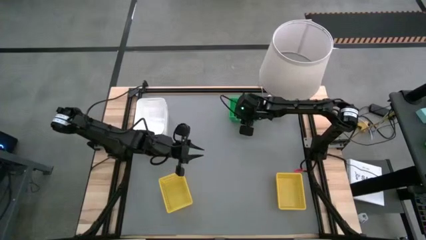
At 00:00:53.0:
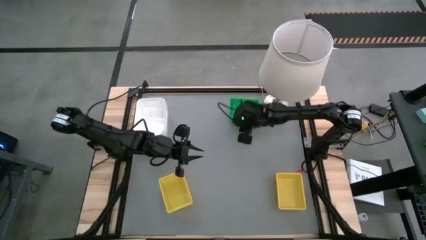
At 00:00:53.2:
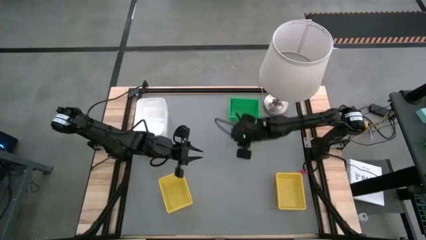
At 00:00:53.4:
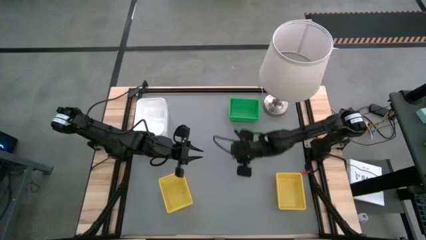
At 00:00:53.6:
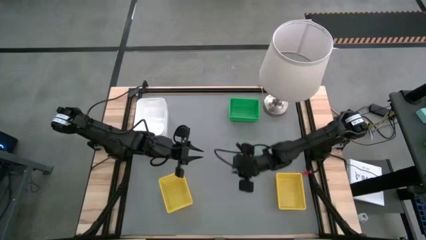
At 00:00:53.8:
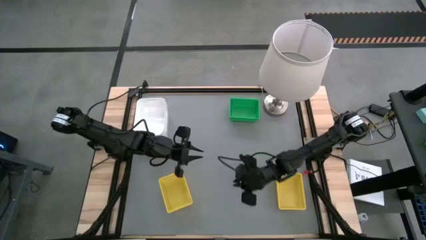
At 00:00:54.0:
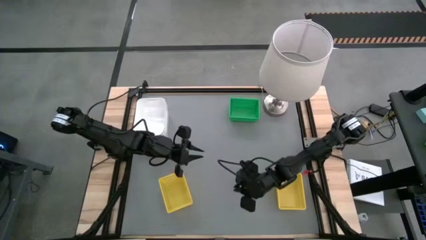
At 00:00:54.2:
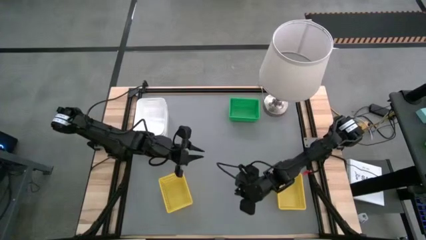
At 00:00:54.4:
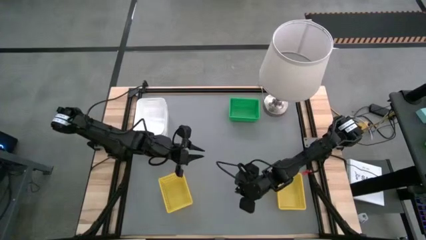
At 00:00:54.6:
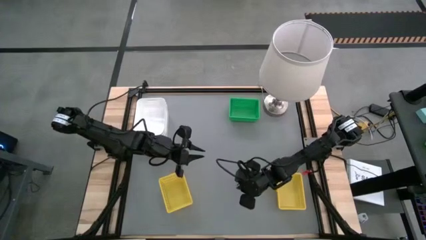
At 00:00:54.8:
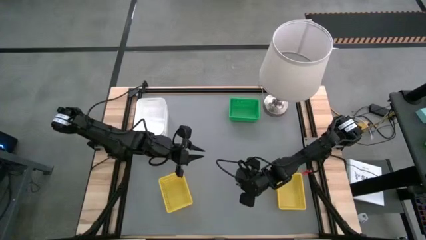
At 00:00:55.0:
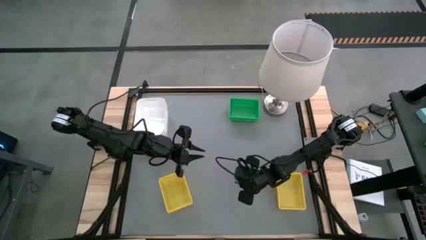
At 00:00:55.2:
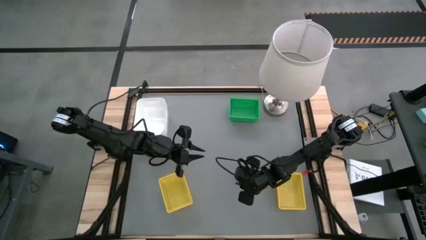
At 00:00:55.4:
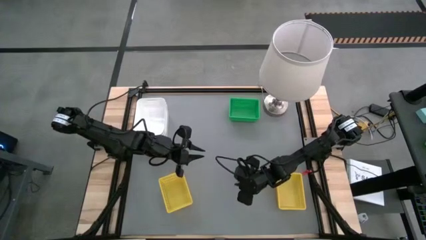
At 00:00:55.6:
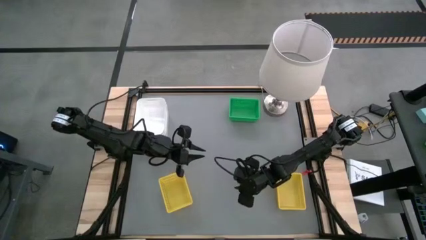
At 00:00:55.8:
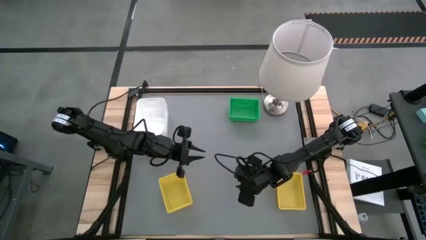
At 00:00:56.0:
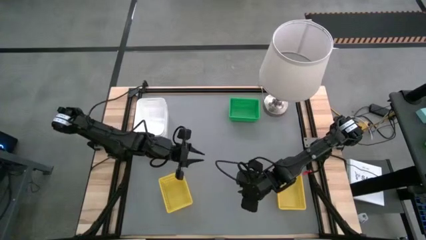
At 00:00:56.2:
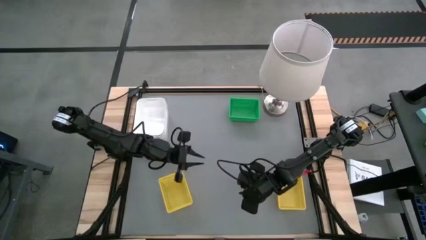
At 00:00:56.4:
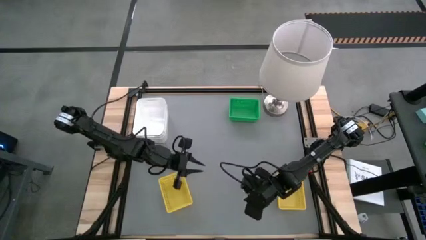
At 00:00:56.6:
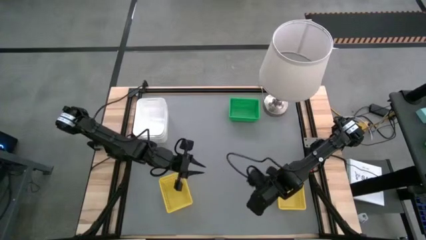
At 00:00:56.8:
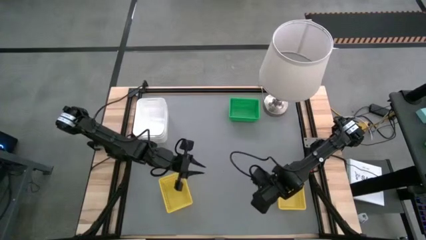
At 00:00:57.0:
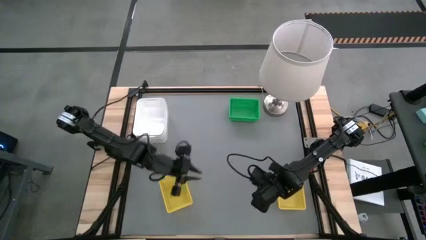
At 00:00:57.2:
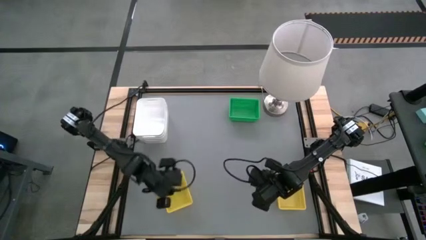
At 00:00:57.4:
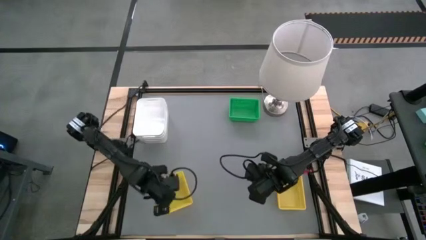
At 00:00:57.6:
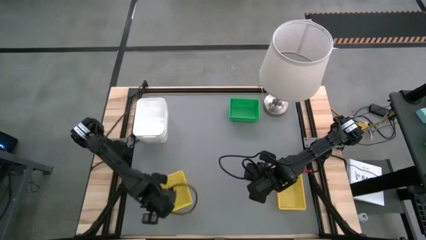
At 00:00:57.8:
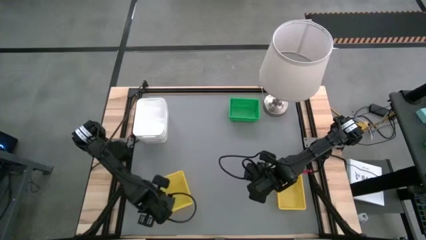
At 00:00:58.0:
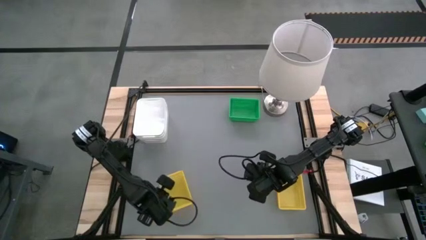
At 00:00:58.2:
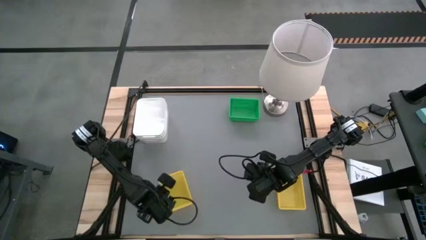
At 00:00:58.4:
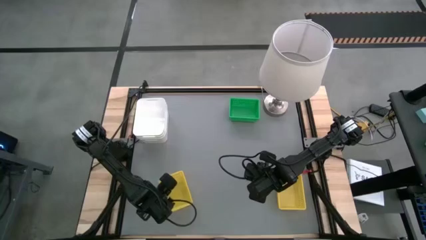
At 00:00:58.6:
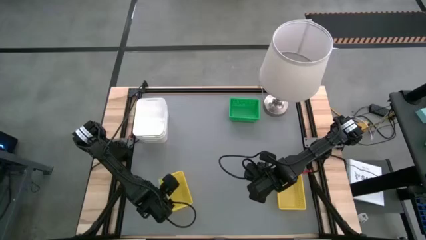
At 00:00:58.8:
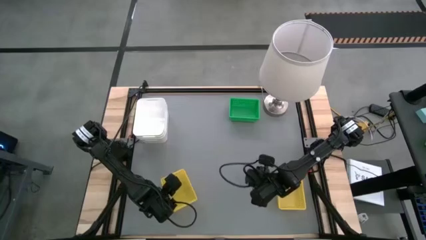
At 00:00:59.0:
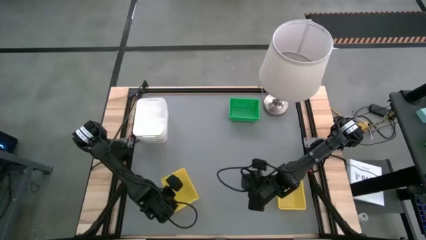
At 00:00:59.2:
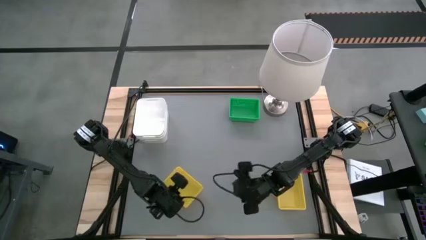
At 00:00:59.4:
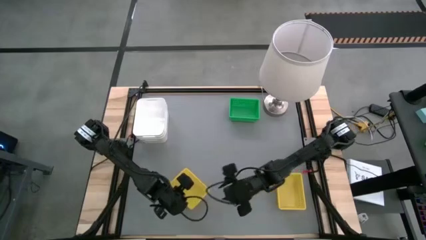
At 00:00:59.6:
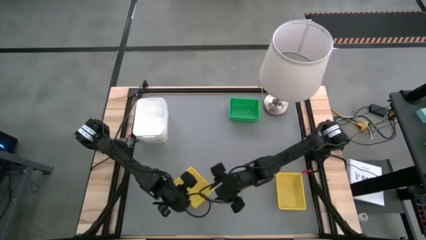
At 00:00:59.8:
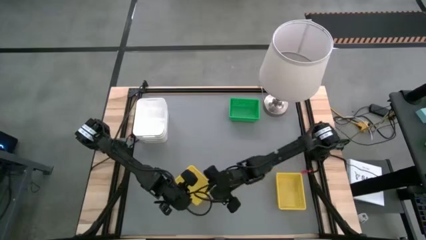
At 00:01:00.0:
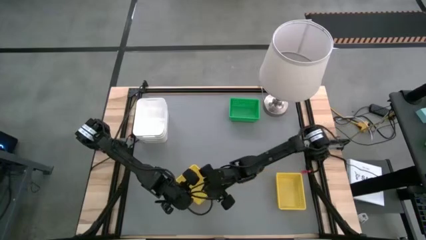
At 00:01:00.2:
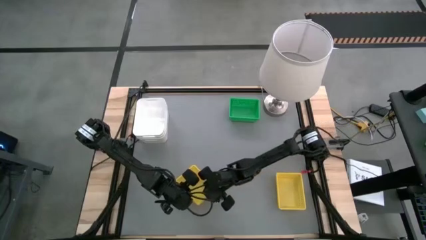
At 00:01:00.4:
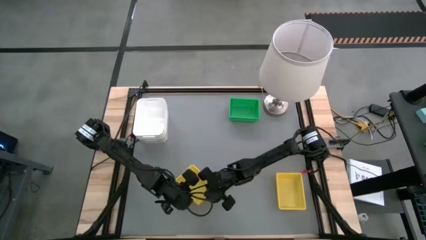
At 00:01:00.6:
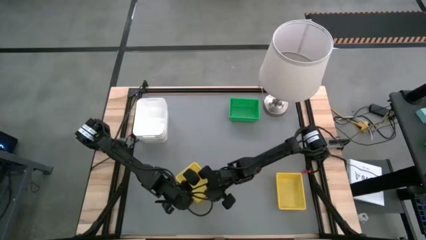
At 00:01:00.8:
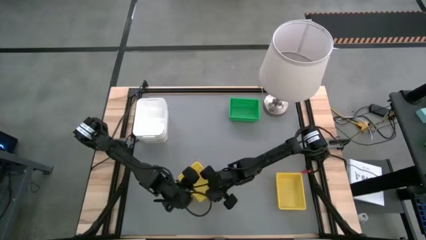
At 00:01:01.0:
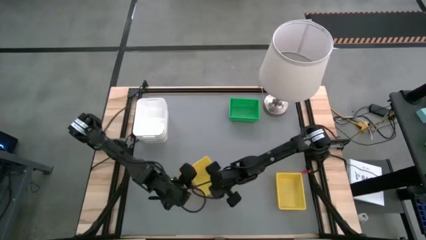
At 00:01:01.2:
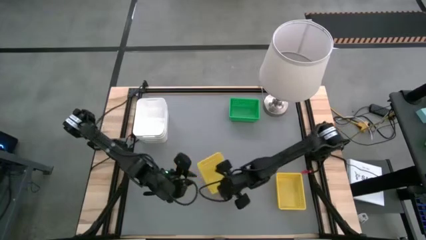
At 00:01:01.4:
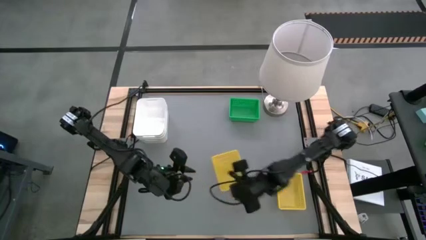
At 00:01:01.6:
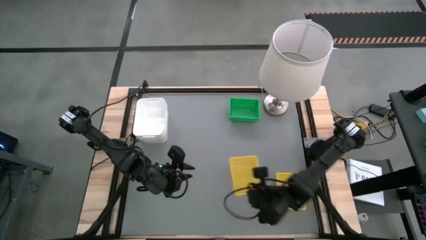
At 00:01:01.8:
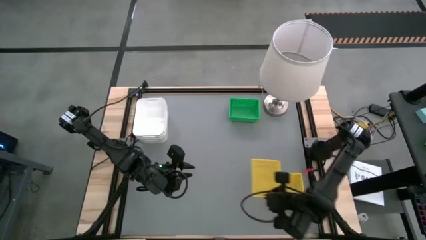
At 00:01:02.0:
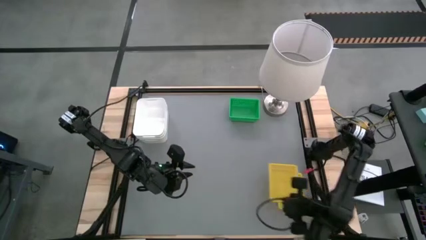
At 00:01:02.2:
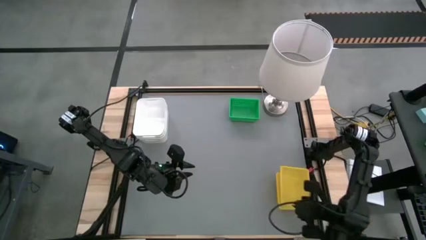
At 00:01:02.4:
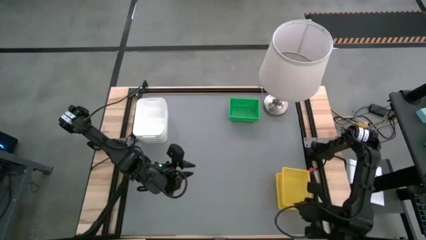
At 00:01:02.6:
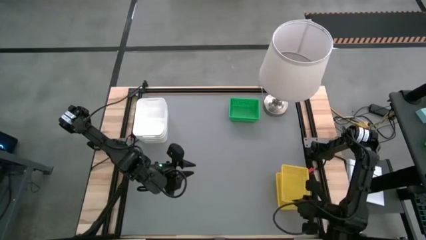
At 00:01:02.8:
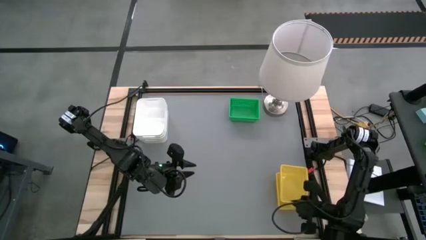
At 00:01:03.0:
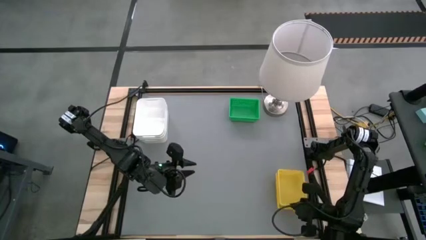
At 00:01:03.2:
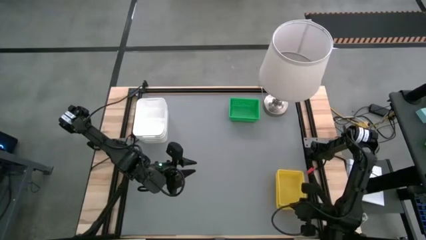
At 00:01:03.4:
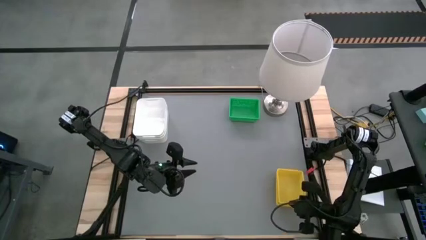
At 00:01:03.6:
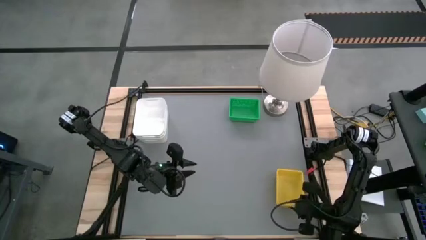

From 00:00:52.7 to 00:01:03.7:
Stack the left yellow bin on the right yellow bins

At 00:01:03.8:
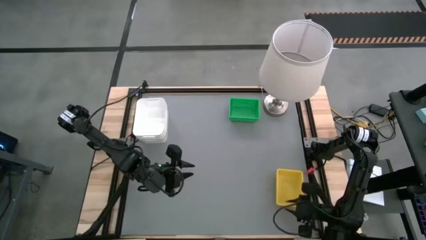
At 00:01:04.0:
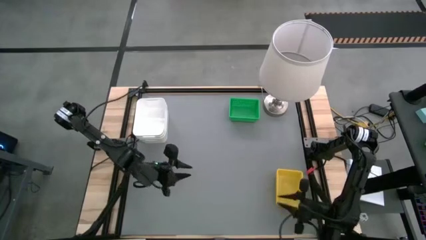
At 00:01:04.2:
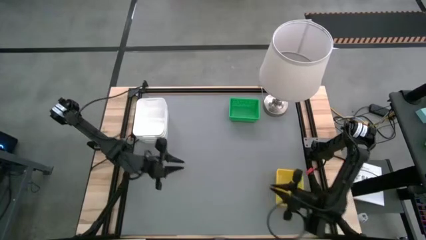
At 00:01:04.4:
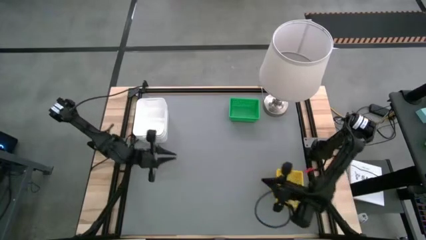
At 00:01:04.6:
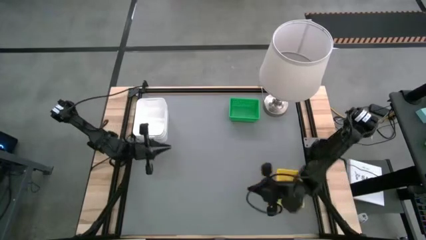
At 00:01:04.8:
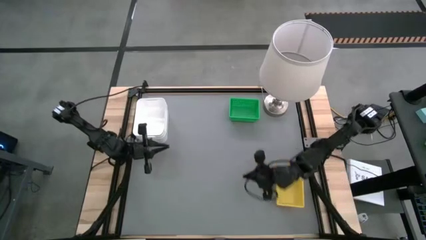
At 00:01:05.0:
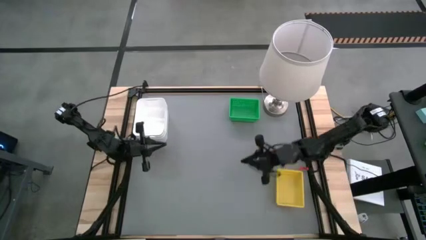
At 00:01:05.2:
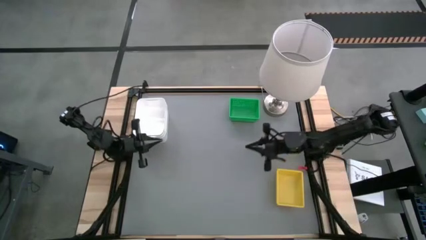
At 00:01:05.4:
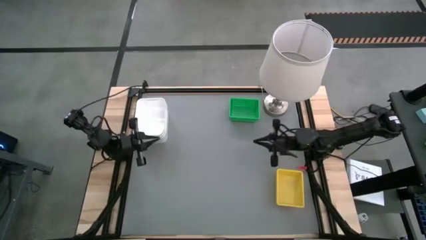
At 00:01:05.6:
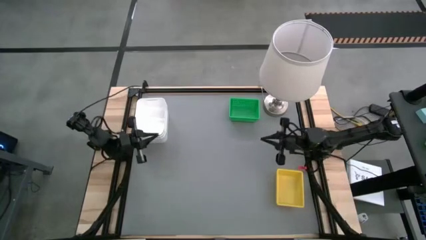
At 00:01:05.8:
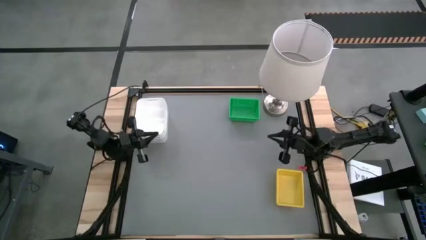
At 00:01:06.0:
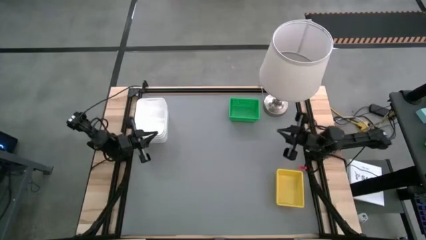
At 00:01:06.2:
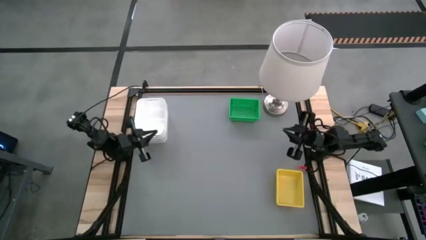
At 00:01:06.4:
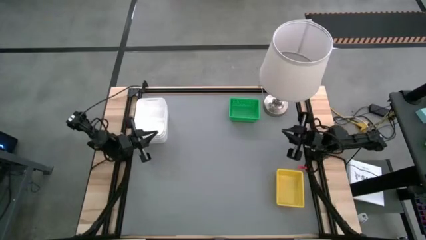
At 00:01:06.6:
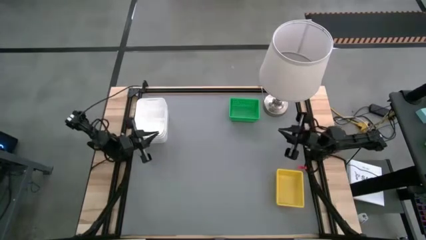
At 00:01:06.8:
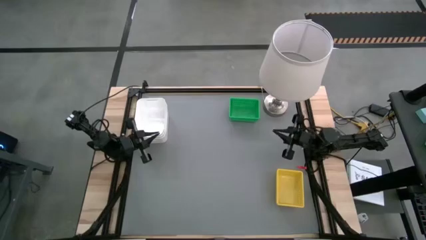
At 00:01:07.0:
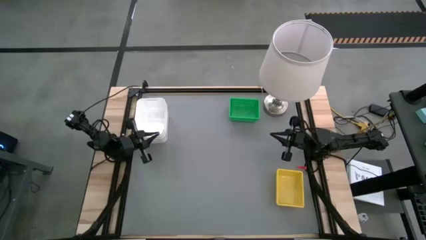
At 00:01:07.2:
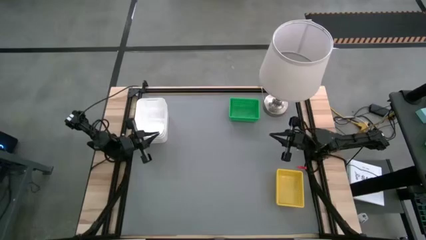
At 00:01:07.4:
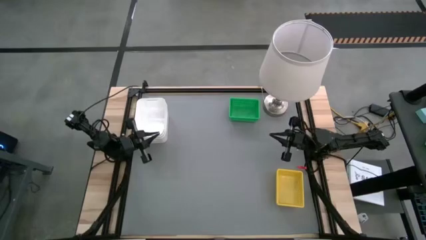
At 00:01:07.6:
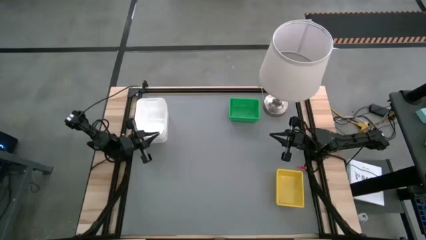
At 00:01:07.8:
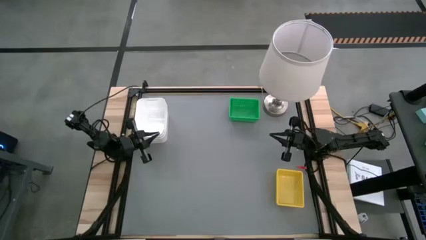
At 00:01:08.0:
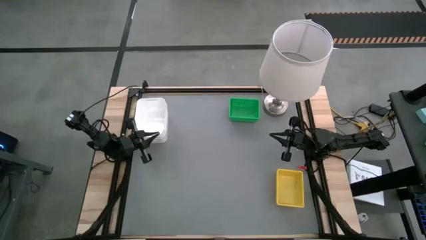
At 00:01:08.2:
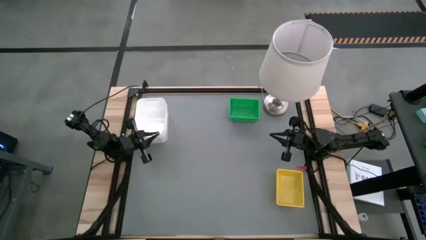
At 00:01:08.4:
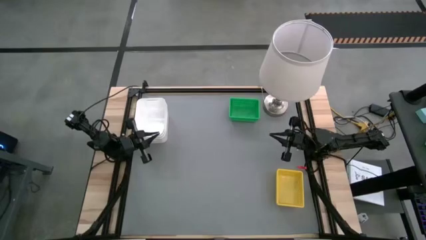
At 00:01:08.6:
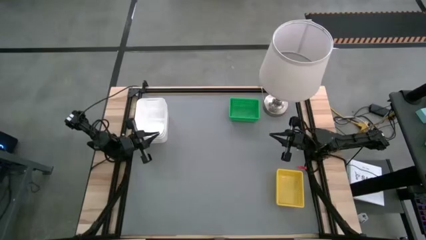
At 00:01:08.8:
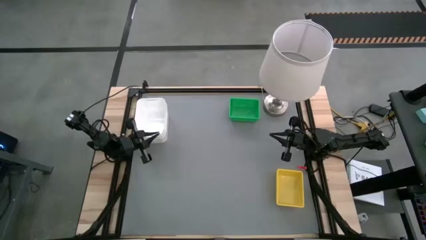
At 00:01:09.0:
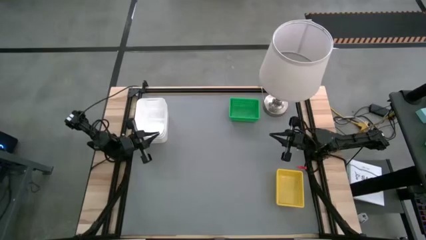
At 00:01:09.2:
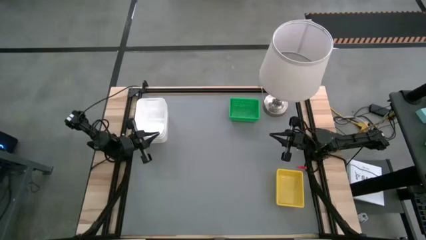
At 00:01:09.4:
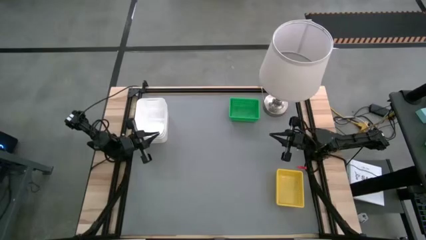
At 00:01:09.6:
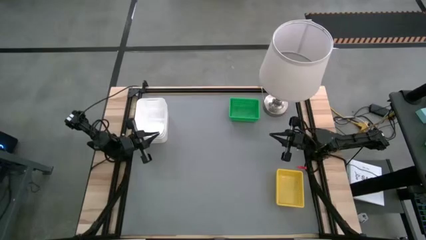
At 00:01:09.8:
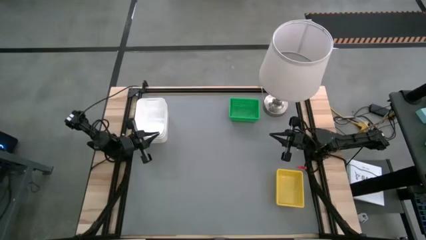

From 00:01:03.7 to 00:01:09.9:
Return to Home Position
